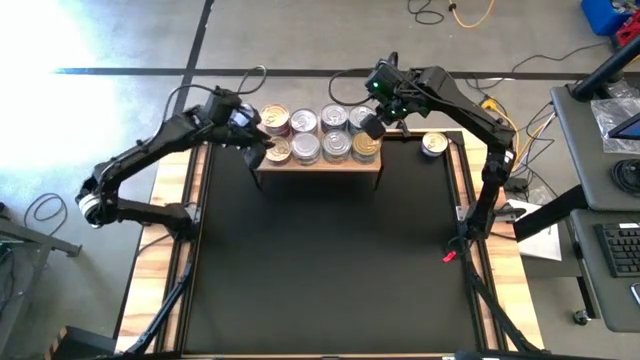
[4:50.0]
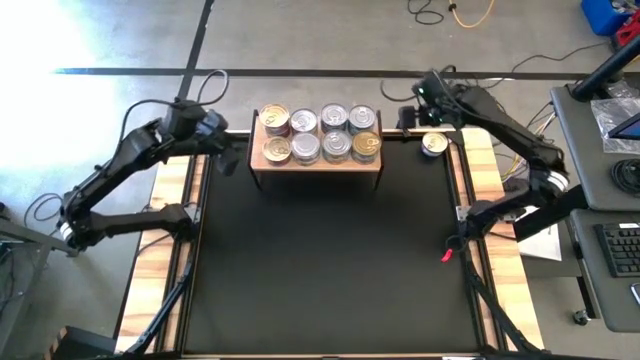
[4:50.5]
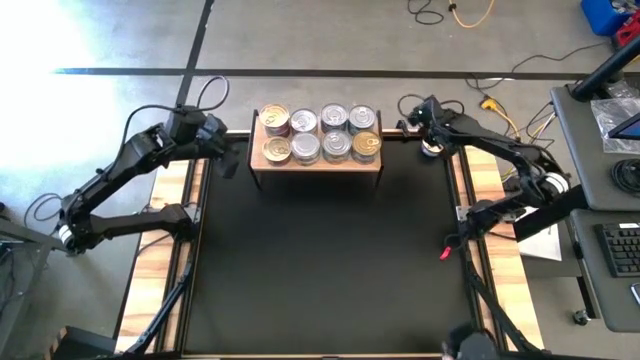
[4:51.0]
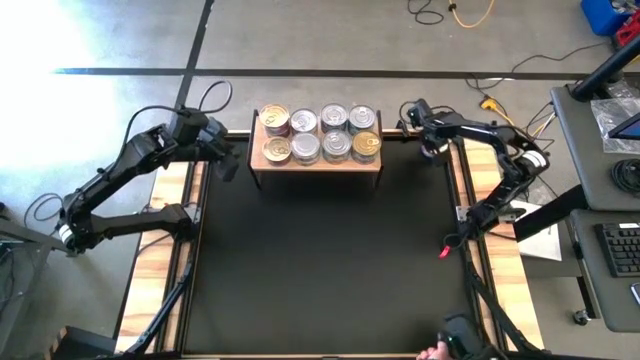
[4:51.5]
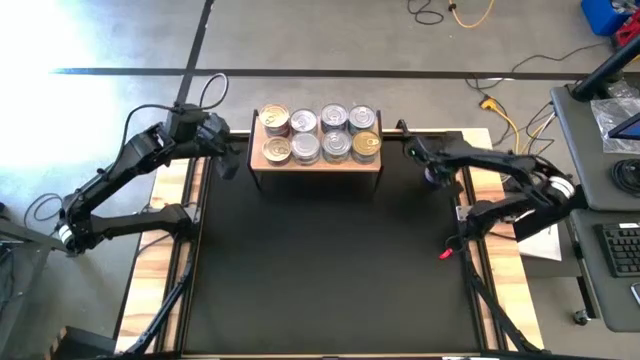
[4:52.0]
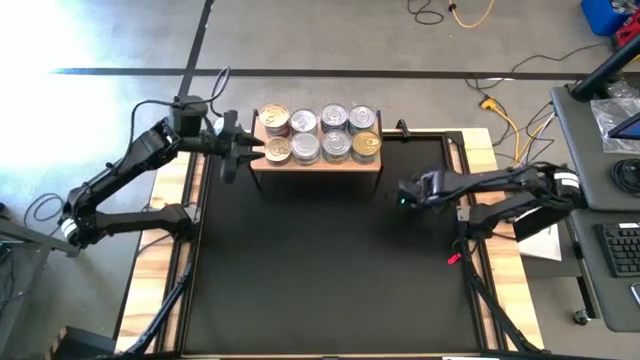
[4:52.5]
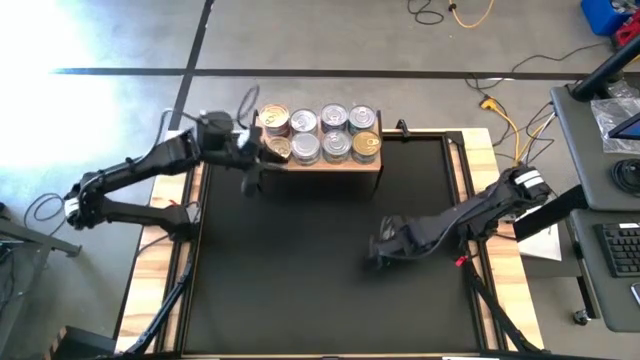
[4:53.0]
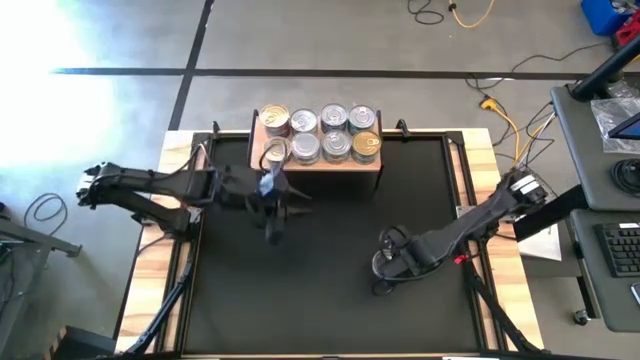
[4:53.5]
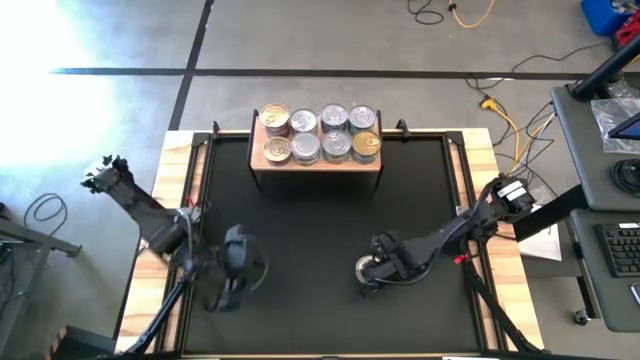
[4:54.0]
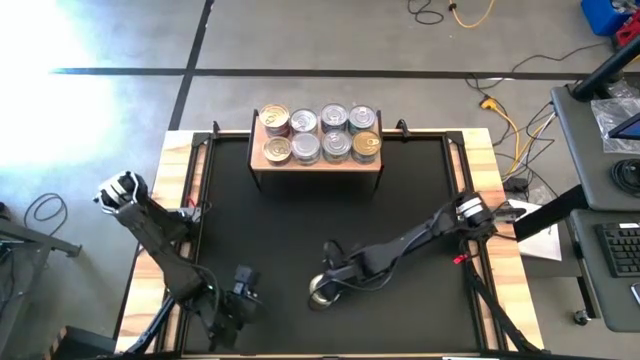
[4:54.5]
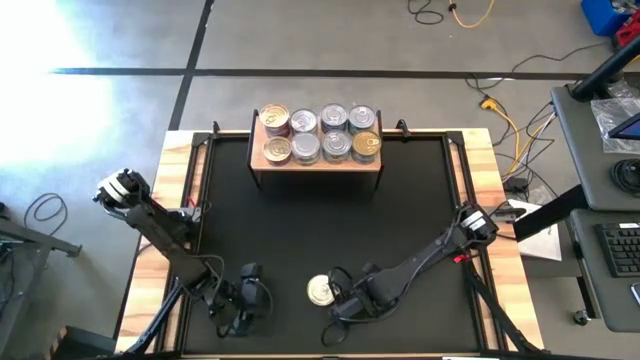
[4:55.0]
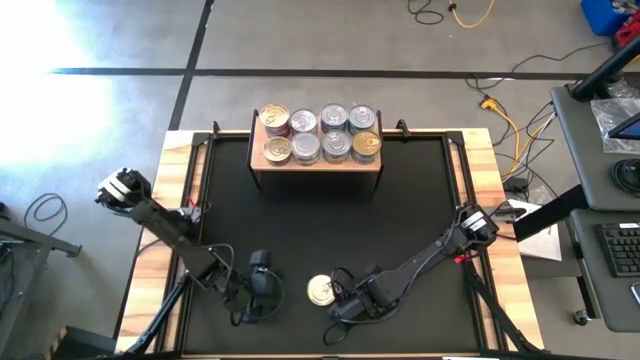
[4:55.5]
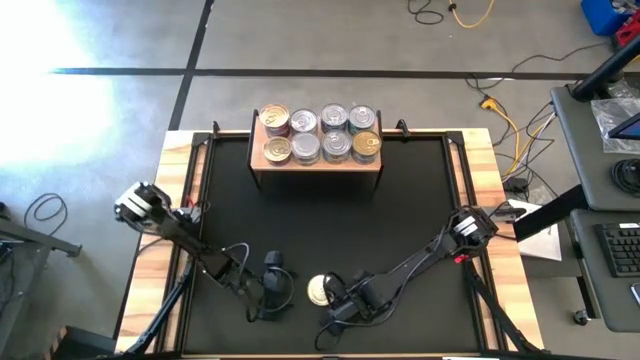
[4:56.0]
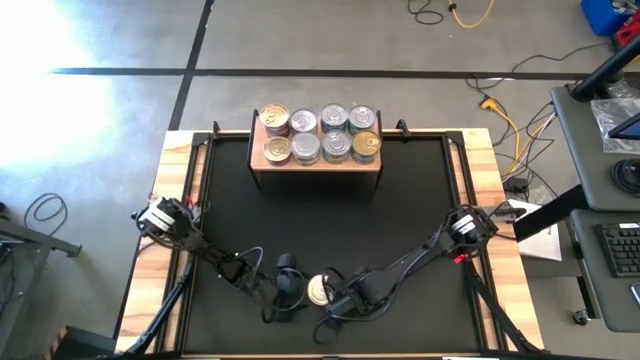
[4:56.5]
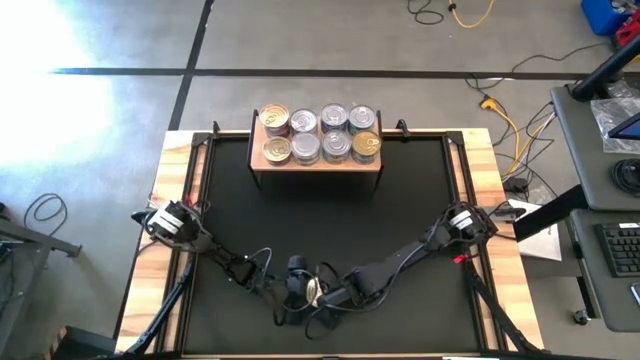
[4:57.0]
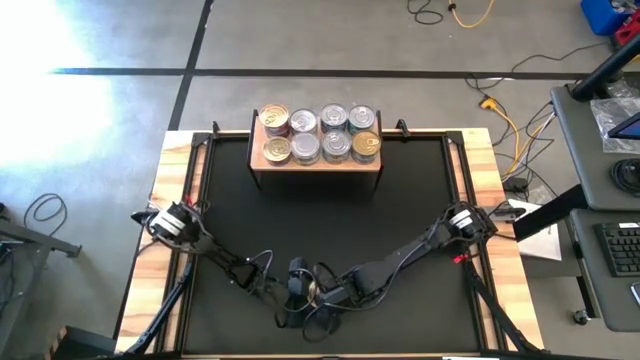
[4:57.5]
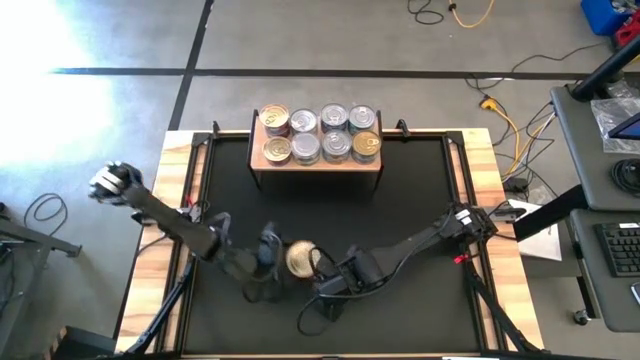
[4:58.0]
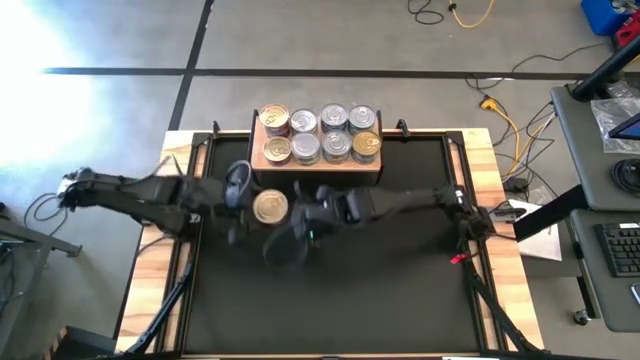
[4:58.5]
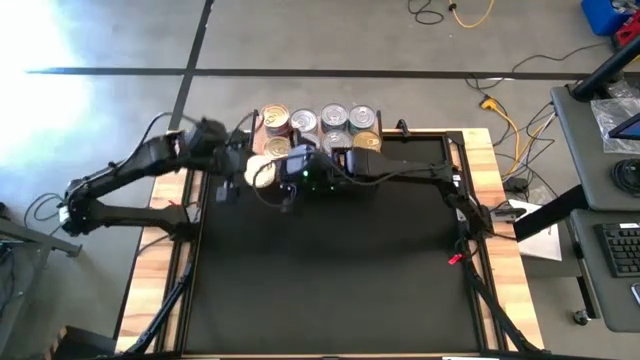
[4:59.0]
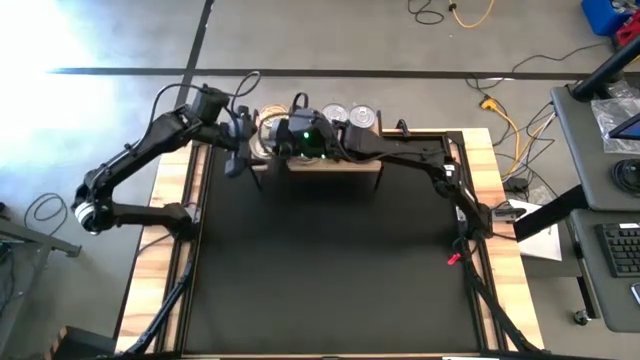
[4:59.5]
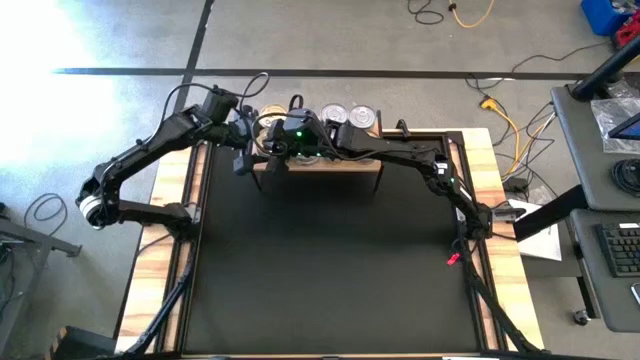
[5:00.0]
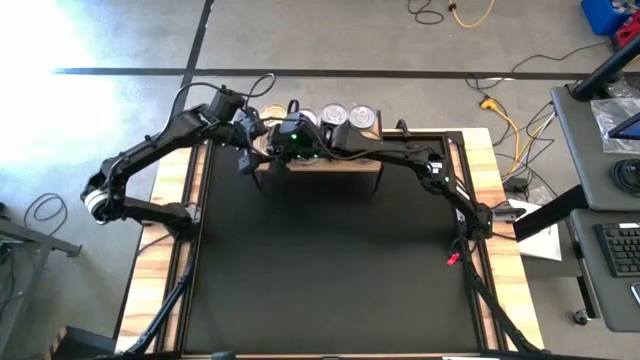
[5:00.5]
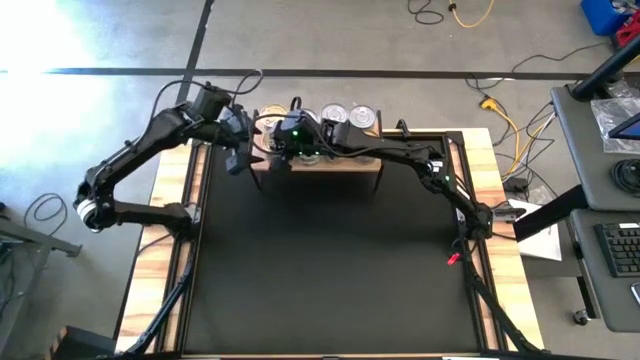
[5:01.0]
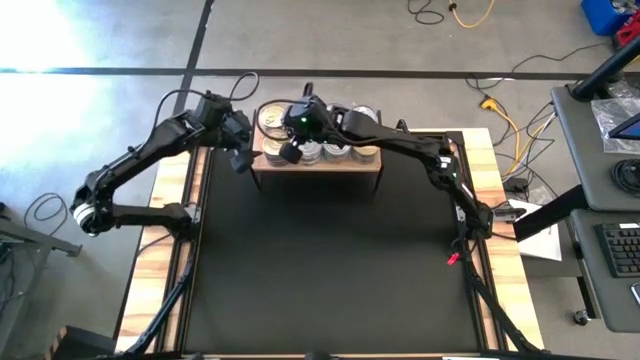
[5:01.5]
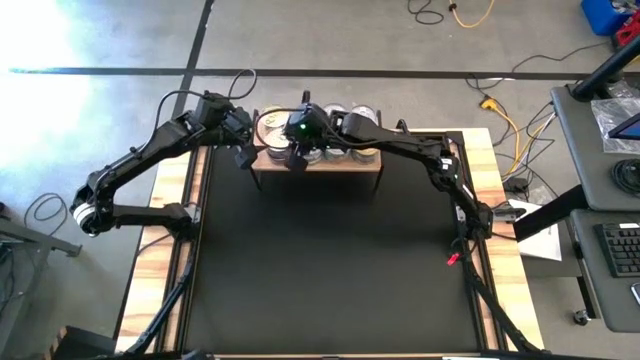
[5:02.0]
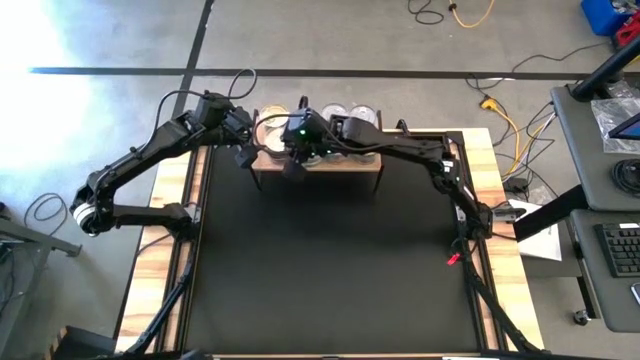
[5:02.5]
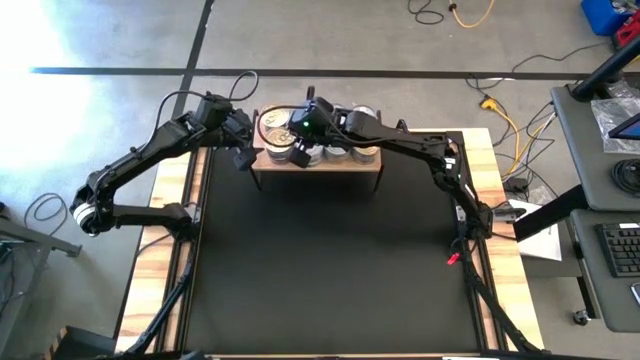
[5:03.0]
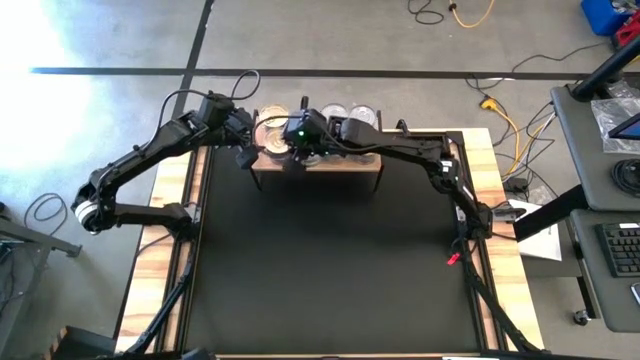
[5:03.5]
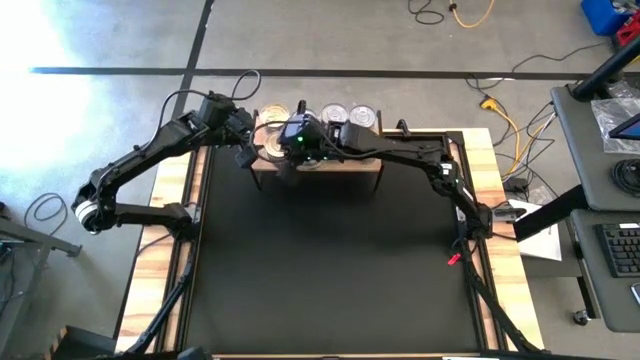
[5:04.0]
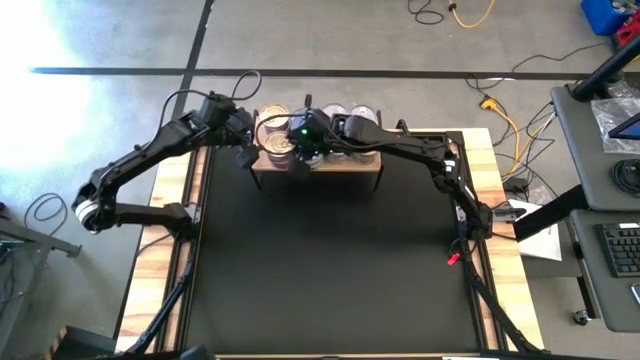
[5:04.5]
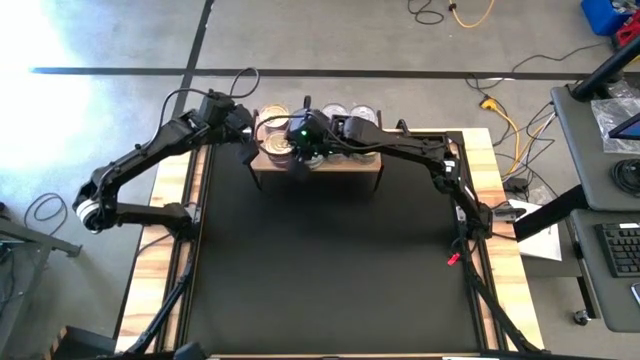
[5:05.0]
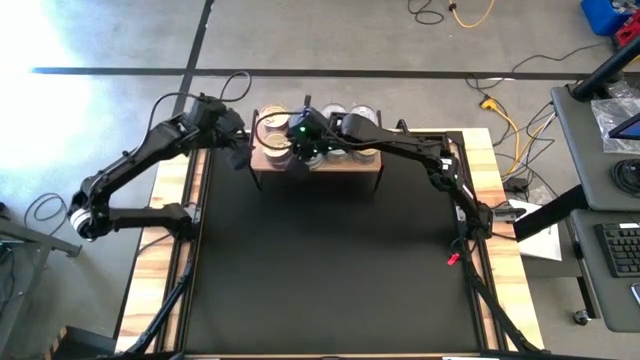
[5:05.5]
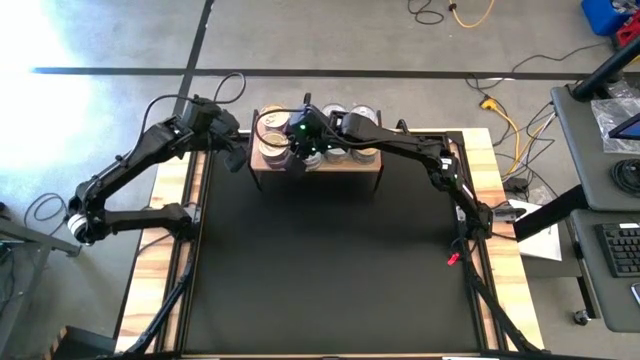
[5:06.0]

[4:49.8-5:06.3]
Task: Stack canned seafood by type on shelf
Stack the blue pink tuna can on the top of the bottom blue pink tuna can on the shelf

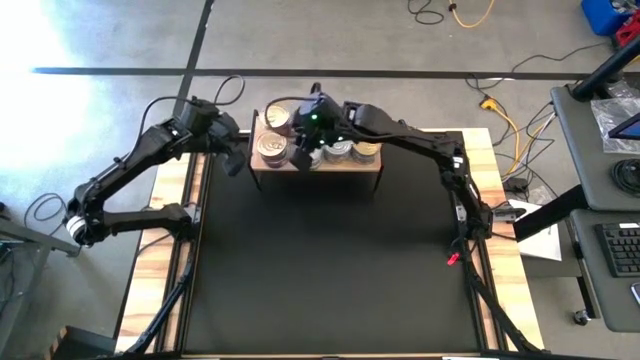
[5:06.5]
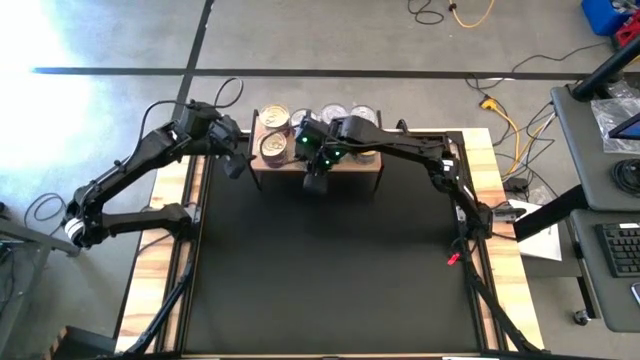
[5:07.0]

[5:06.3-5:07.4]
Adjust the white green stacked tuna cans on the shelf

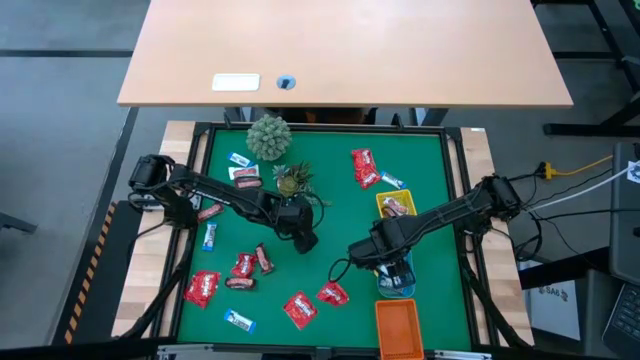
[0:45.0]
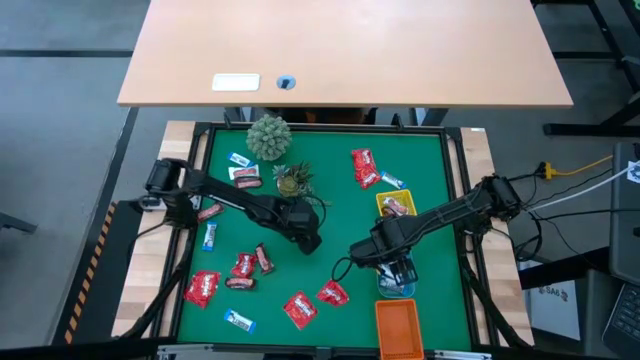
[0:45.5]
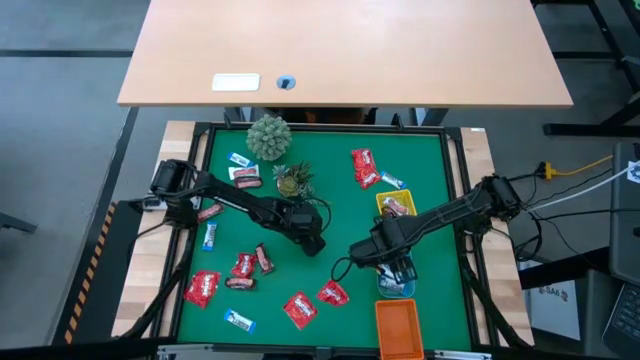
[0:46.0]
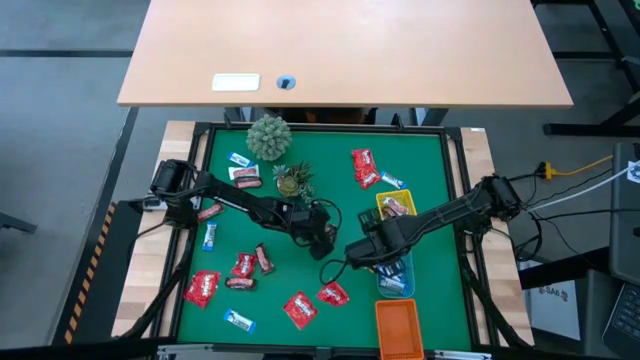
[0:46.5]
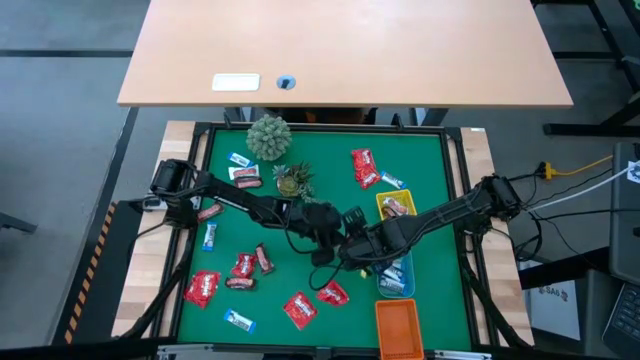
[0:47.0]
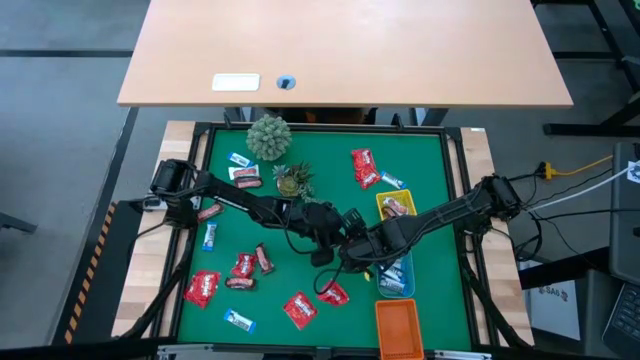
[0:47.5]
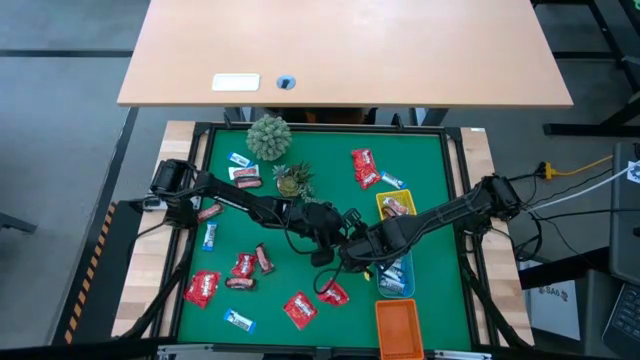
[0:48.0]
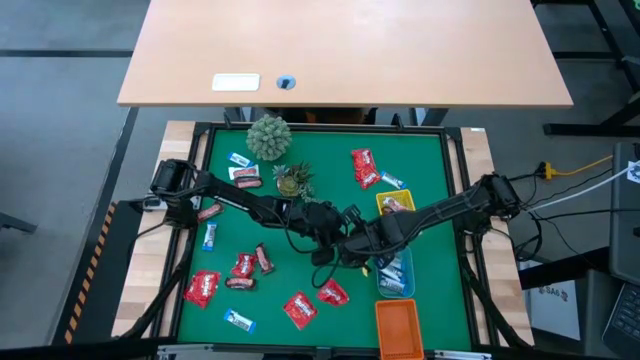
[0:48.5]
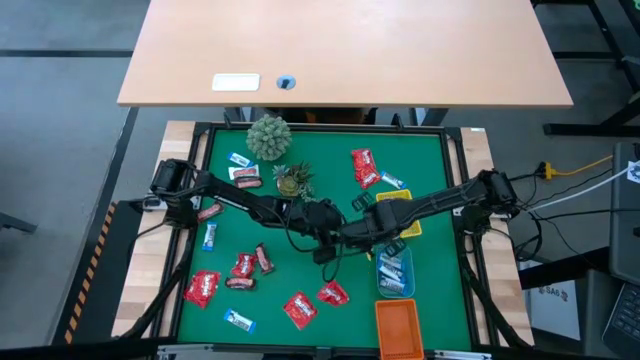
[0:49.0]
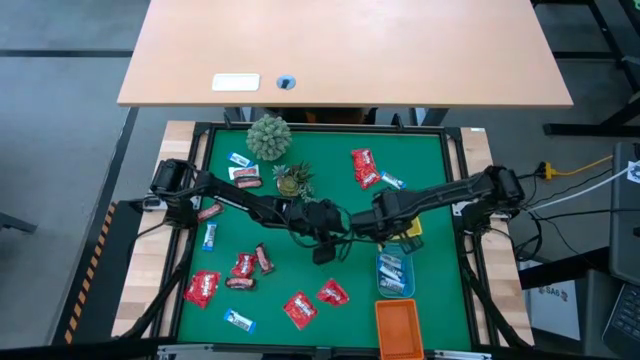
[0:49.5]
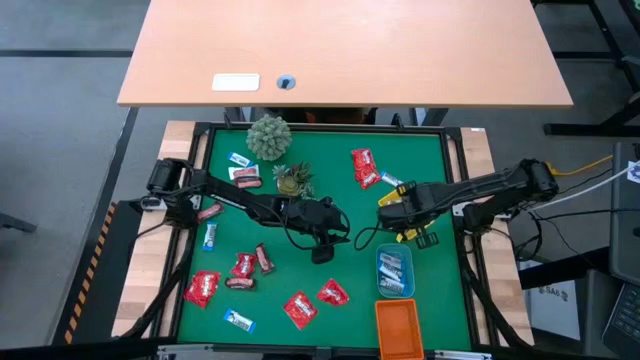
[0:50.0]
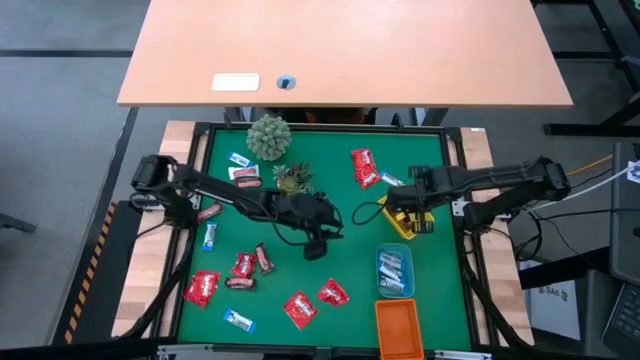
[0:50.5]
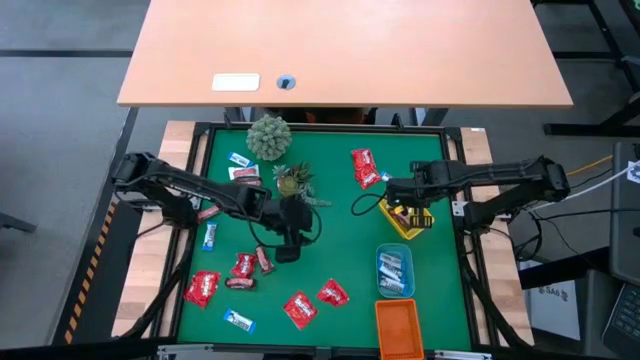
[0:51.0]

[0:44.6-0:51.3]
Task: Sort candy
Put the brown candy into the yellow bin
